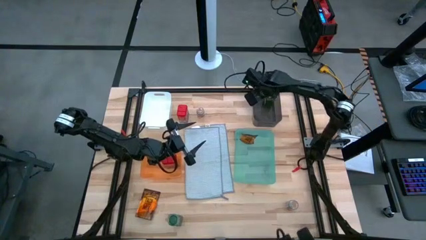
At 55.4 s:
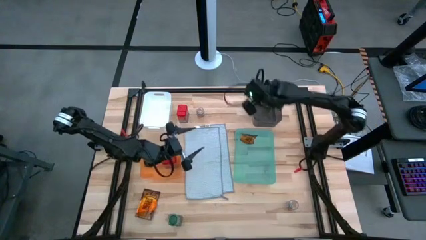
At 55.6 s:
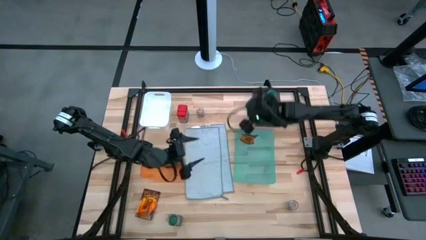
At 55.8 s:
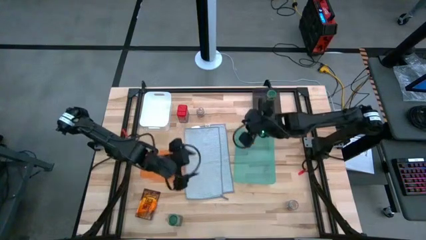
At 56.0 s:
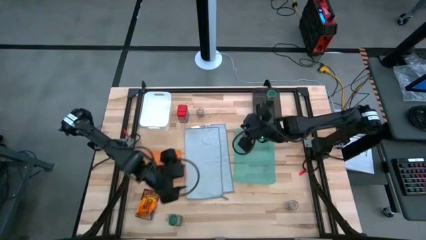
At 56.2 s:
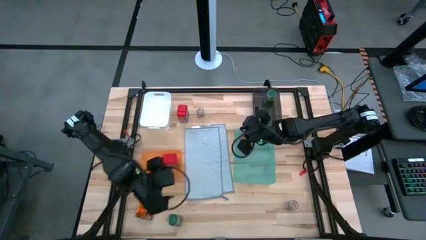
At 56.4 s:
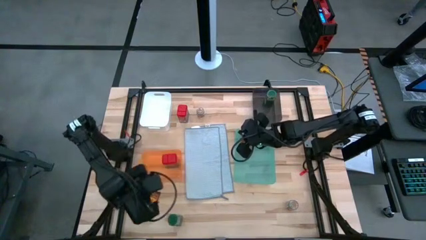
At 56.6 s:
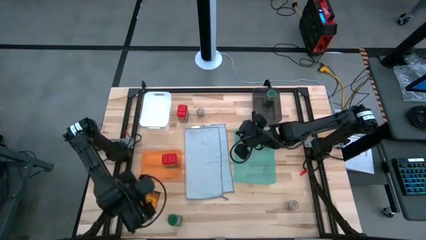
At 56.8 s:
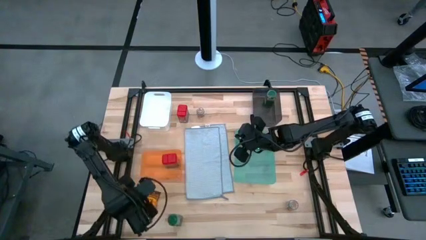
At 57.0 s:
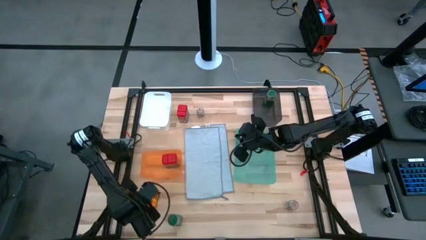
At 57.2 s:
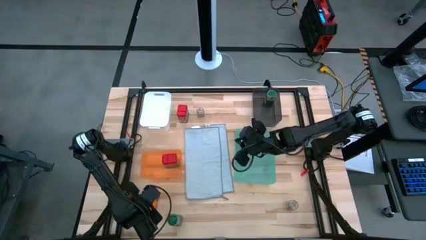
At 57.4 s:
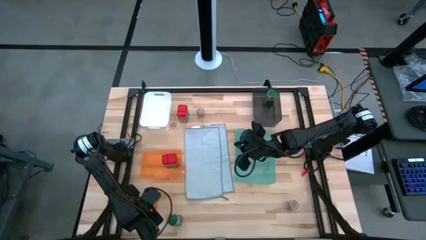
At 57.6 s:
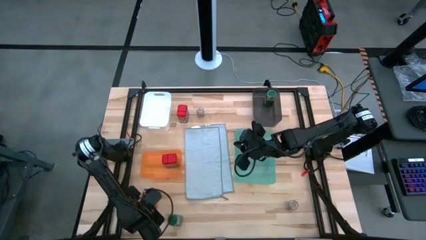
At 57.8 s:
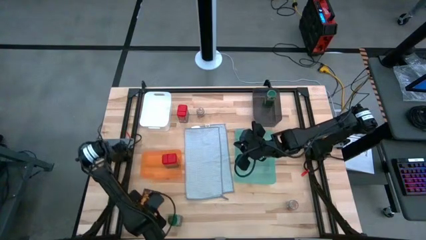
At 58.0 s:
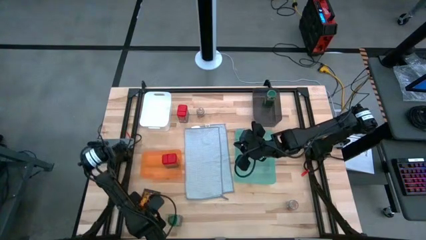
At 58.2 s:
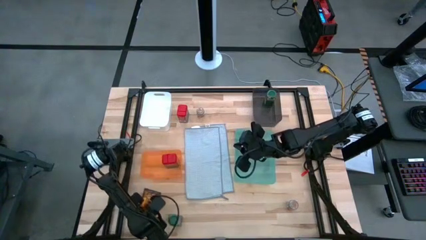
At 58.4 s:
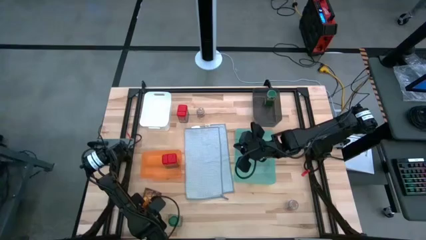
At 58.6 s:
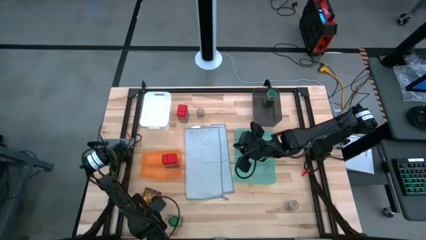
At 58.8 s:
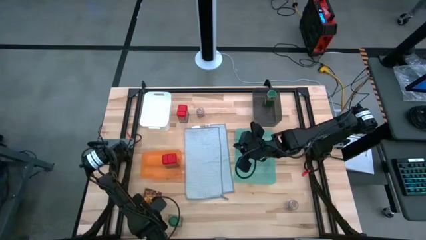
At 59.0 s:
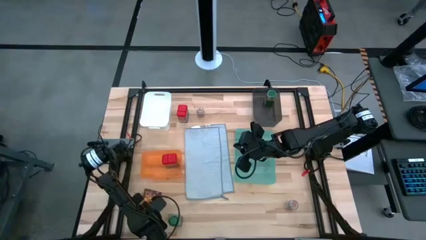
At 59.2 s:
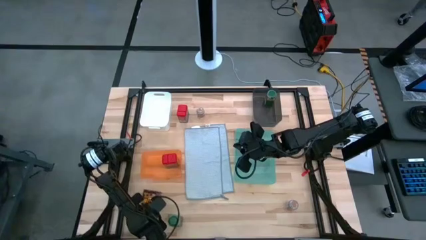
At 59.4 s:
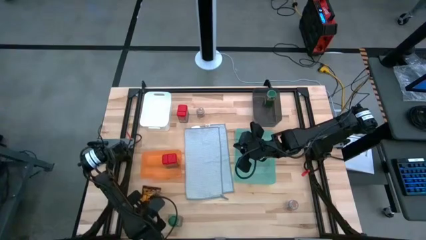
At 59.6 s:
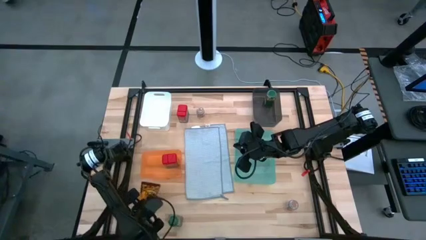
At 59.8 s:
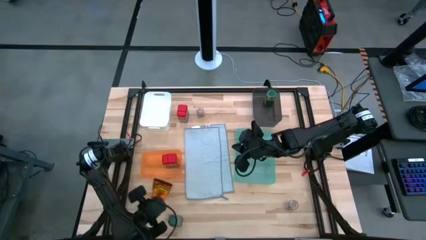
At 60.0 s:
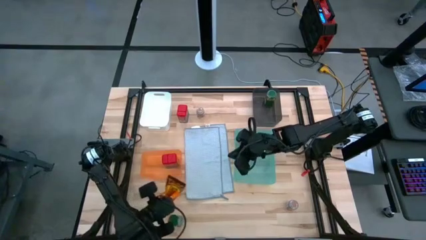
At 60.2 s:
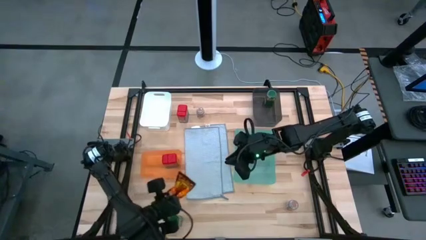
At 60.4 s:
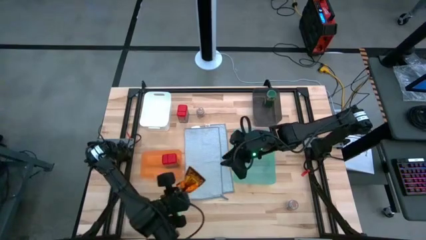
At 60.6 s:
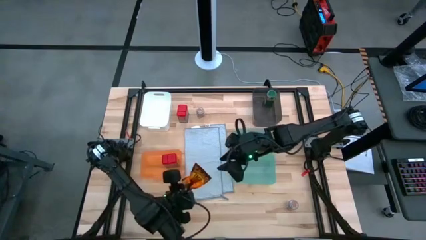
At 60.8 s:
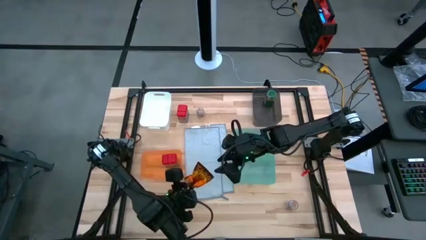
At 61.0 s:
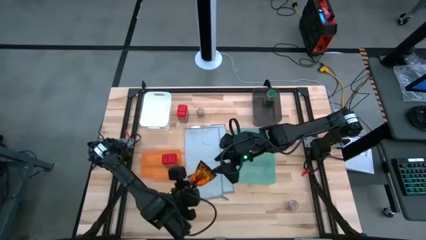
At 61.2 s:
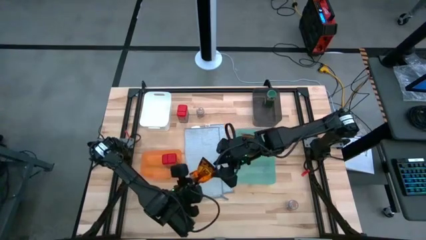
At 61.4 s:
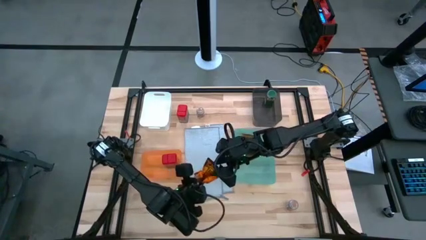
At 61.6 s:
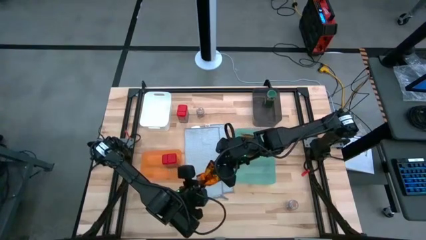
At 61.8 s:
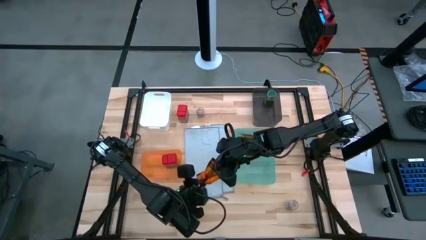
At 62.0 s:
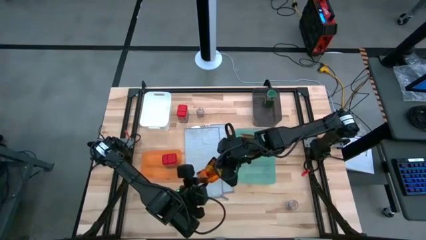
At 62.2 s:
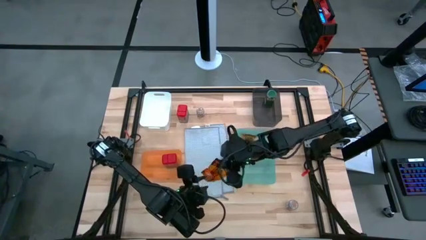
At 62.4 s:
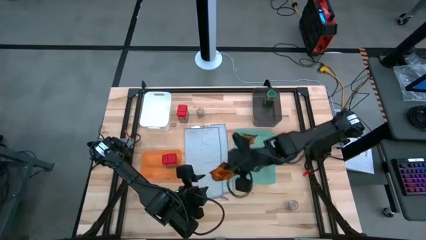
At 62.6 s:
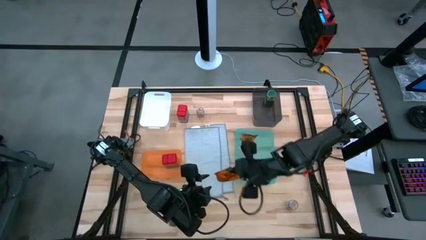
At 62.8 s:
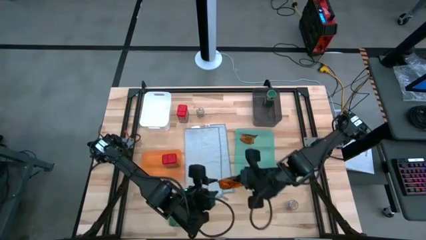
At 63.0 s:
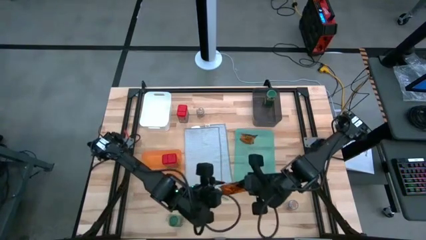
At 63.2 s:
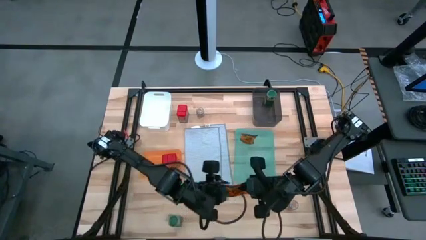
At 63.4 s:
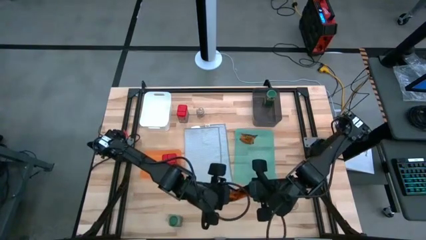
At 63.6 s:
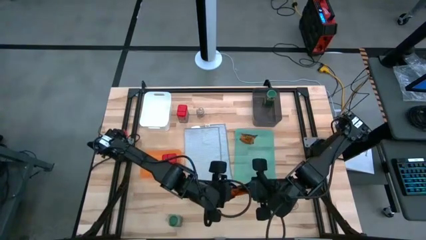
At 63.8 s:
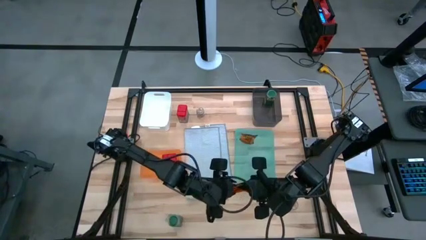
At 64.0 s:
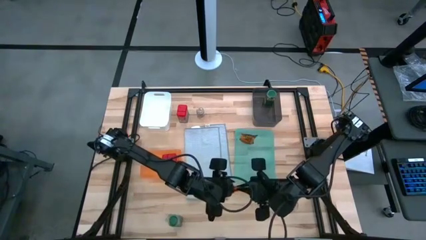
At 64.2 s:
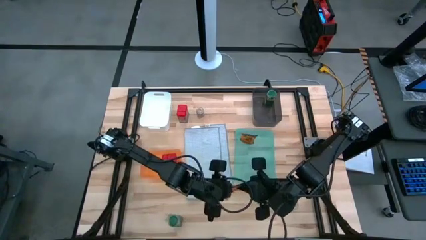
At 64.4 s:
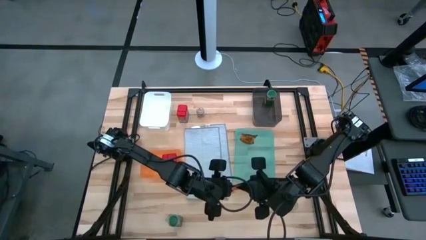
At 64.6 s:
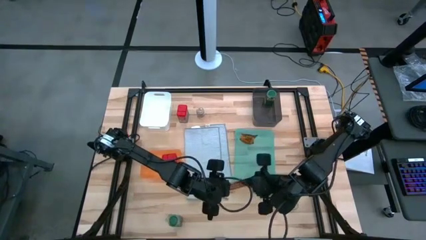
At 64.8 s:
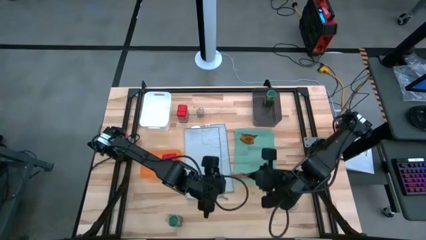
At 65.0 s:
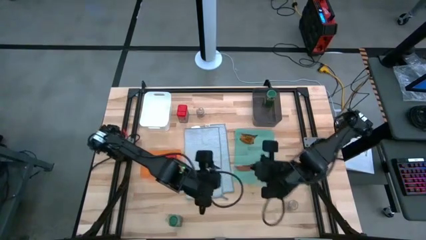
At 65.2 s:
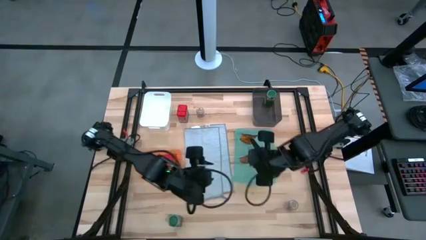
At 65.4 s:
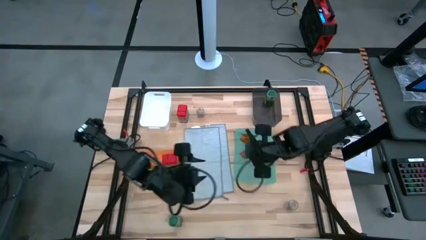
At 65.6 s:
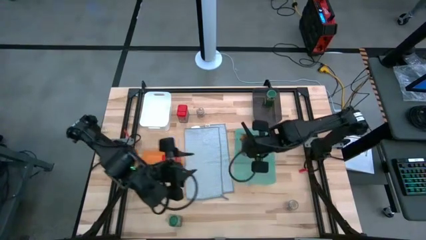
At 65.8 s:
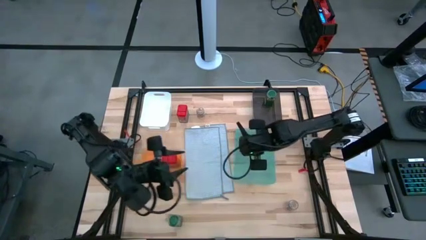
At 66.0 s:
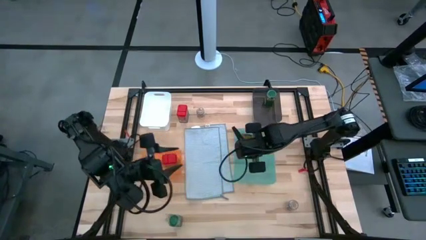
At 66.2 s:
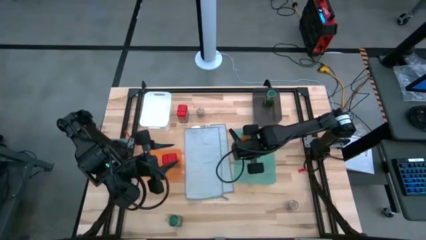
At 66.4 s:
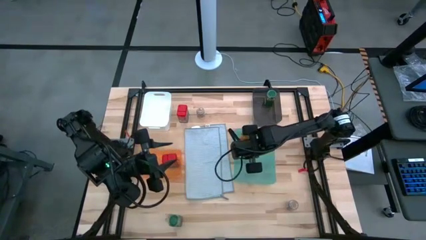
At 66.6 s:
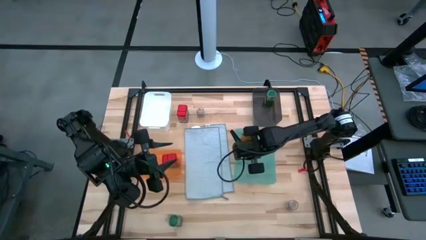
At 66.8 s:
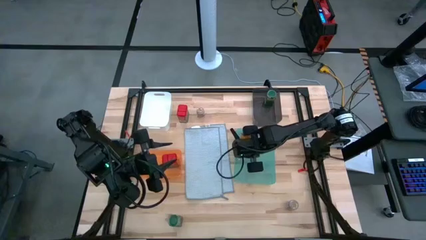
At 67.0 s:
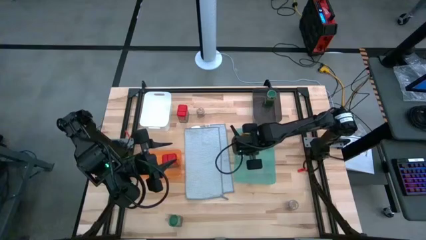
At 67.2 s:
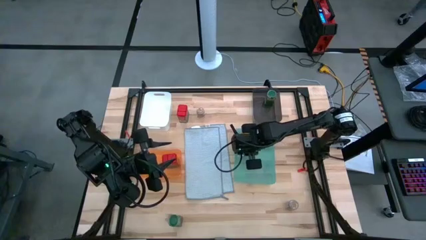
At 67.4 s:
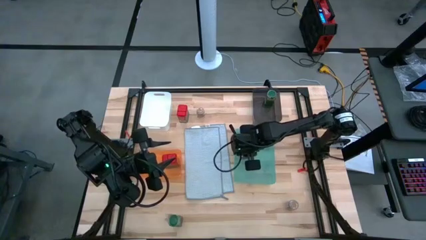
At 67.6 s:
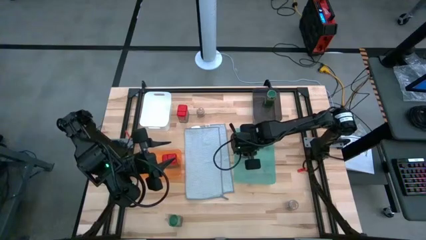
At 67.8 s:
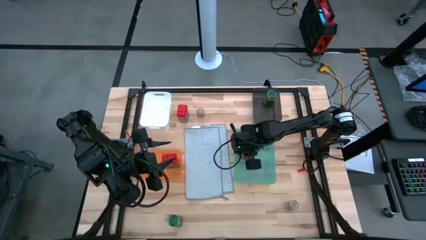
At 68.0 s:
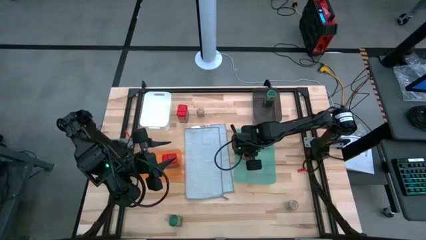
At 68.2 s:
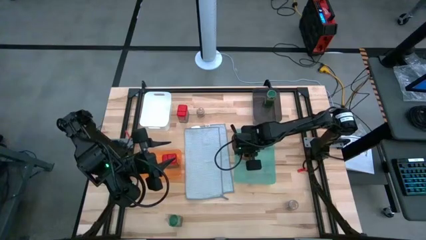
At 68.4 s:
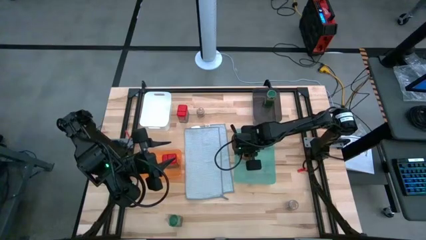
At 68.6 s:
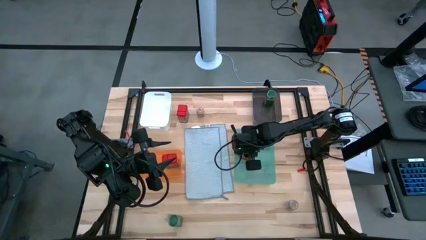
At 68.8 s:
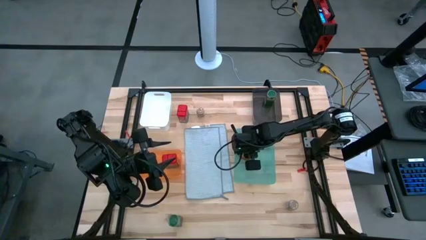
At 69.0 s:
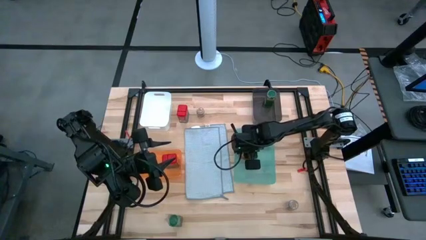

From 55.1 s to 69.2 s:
Task: Sort spices by type
Put the orange seasoning packet into the green bin
